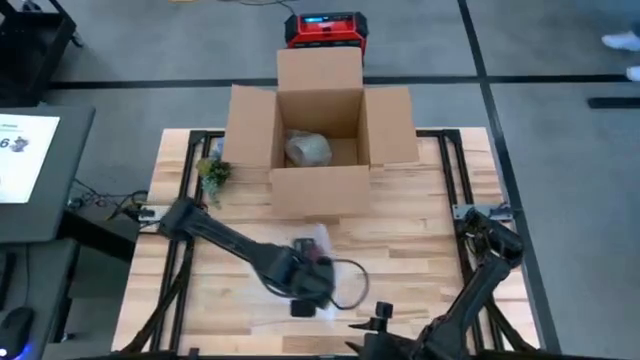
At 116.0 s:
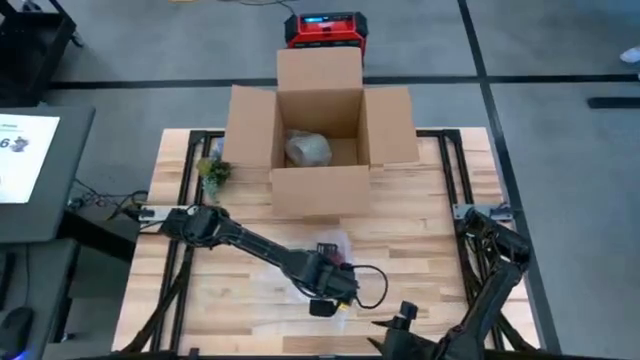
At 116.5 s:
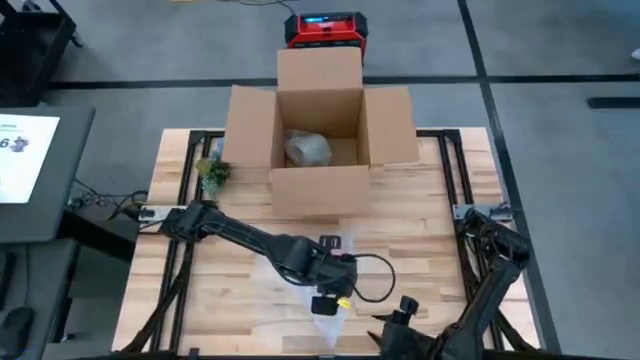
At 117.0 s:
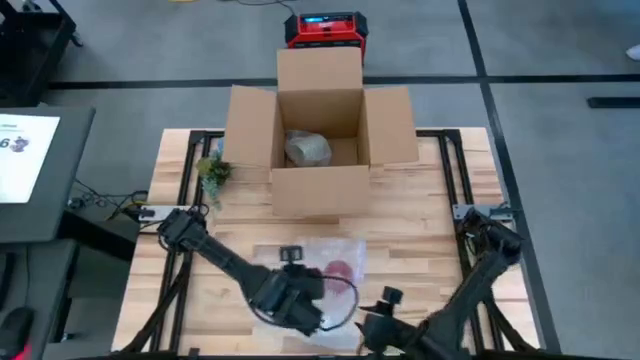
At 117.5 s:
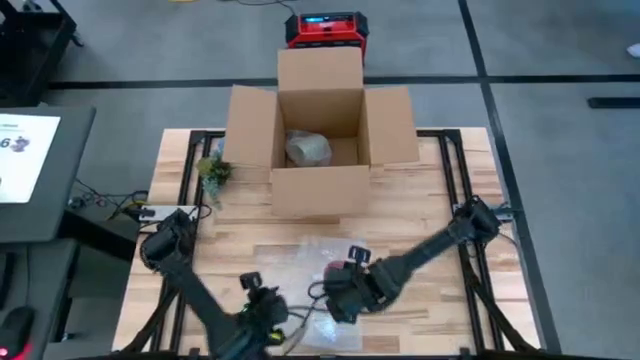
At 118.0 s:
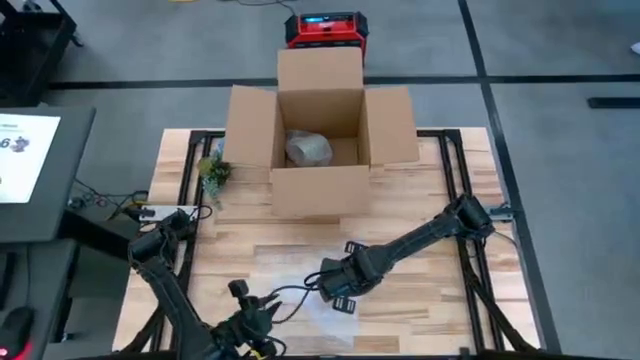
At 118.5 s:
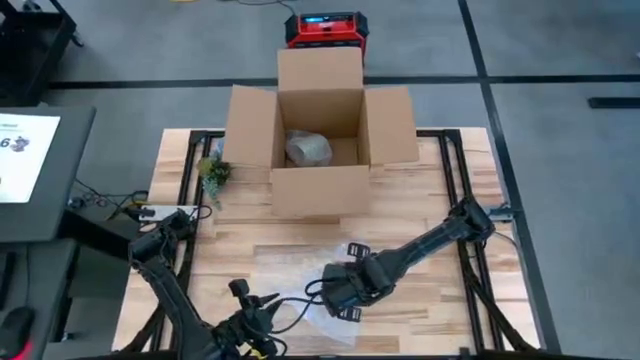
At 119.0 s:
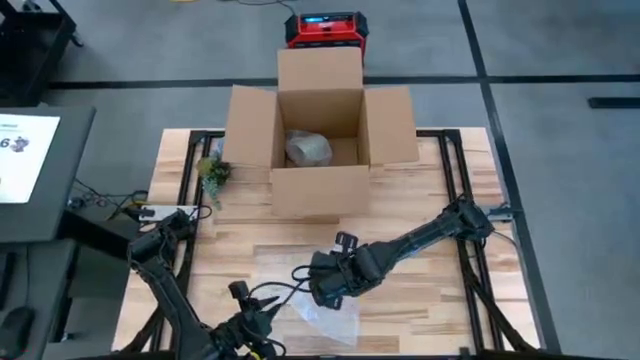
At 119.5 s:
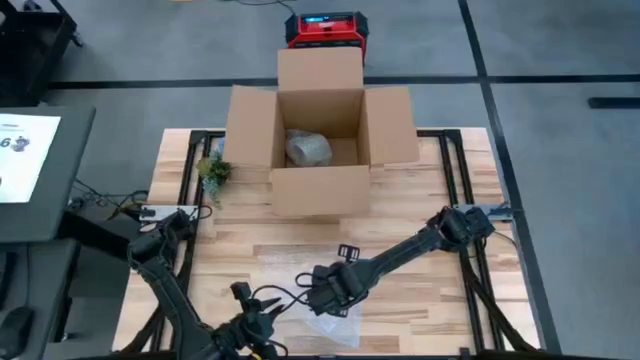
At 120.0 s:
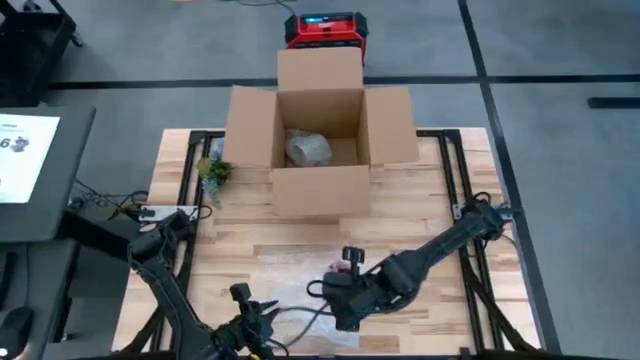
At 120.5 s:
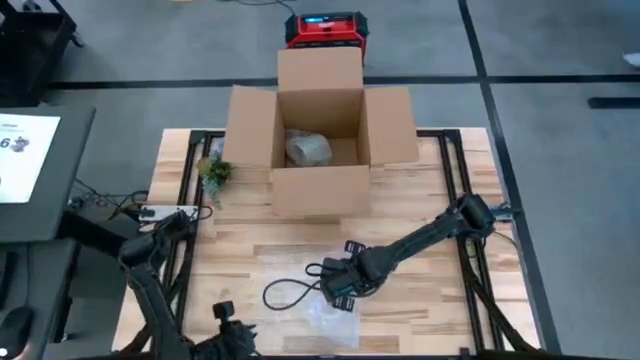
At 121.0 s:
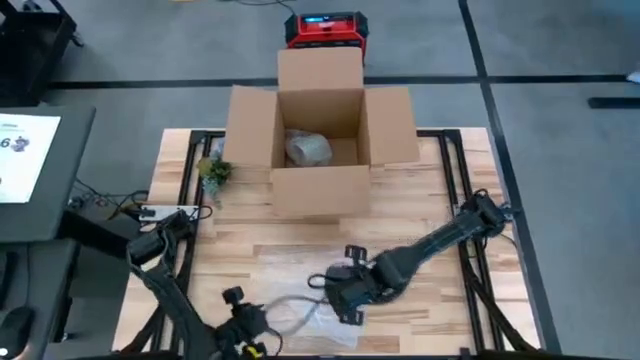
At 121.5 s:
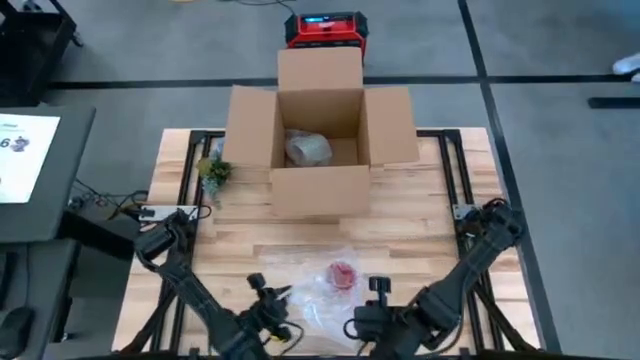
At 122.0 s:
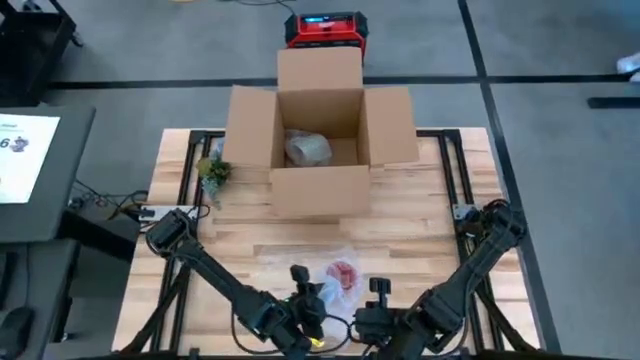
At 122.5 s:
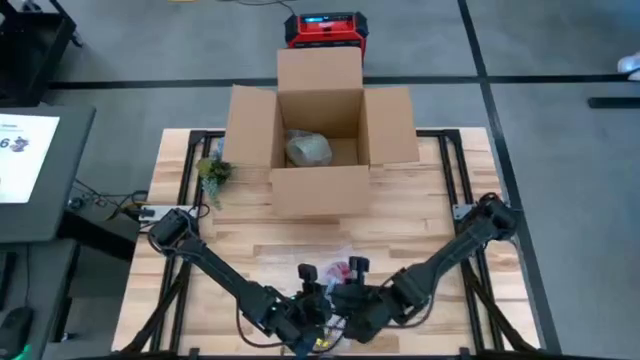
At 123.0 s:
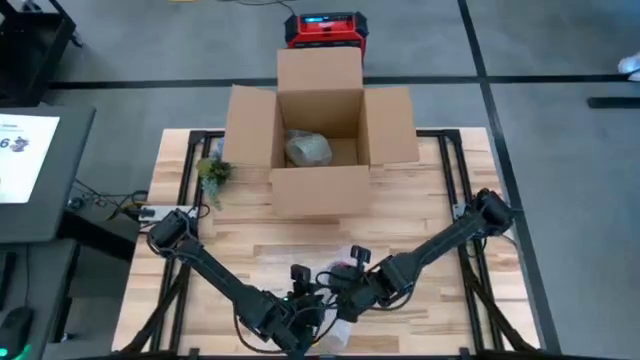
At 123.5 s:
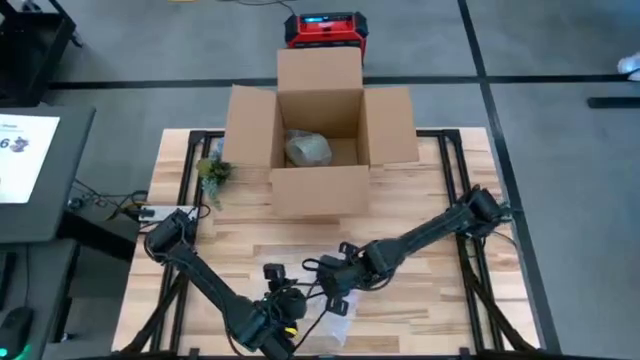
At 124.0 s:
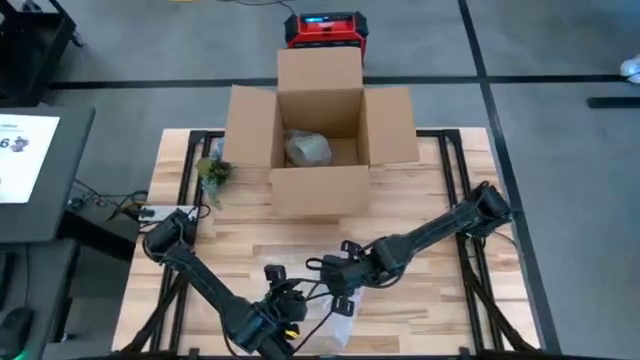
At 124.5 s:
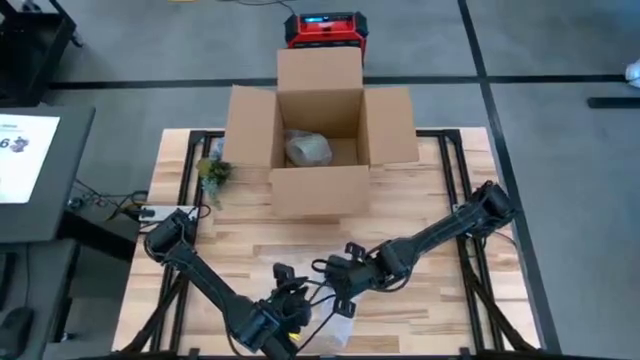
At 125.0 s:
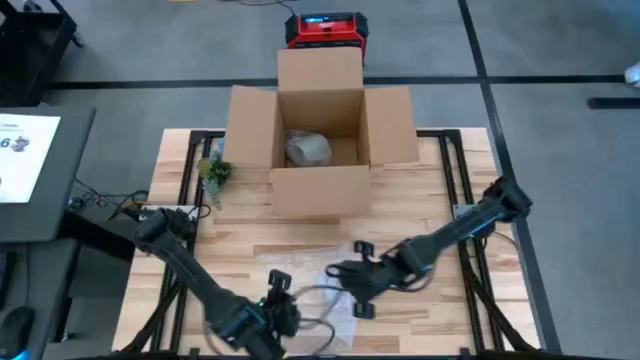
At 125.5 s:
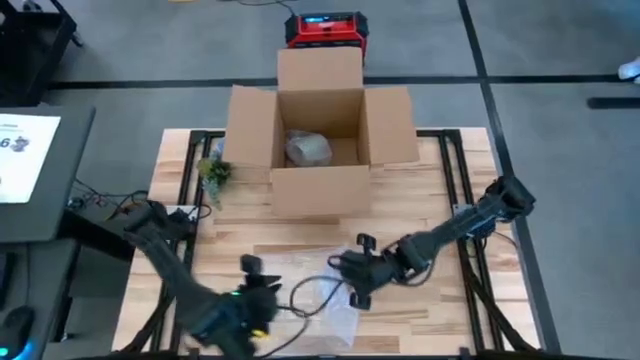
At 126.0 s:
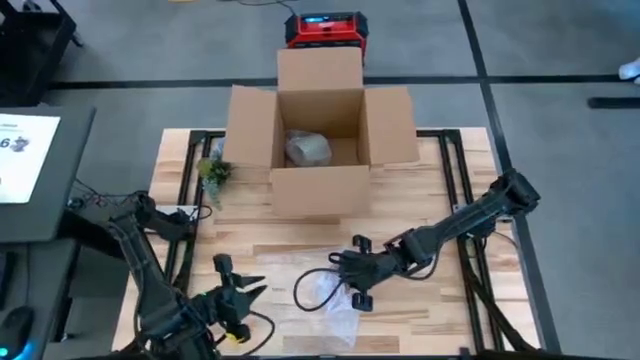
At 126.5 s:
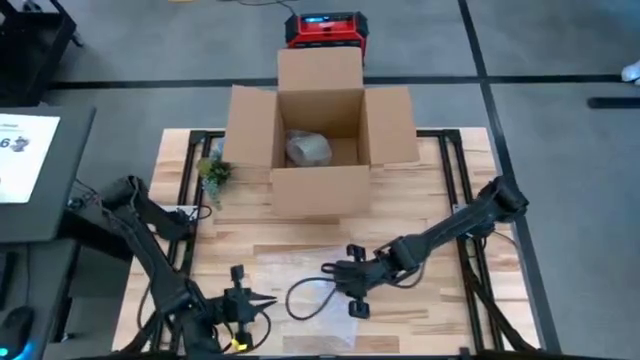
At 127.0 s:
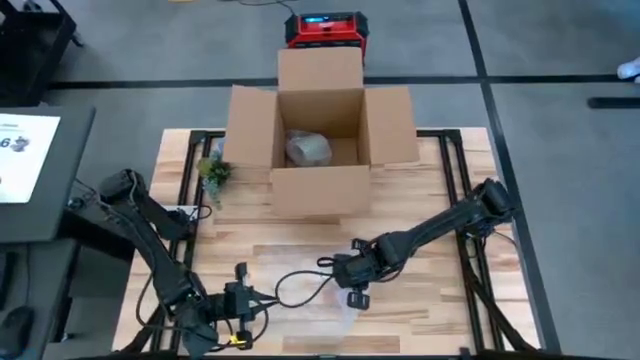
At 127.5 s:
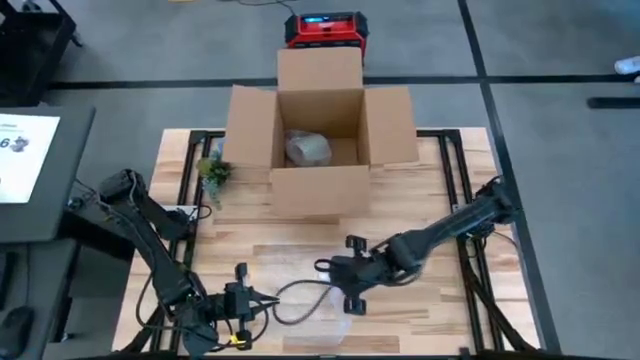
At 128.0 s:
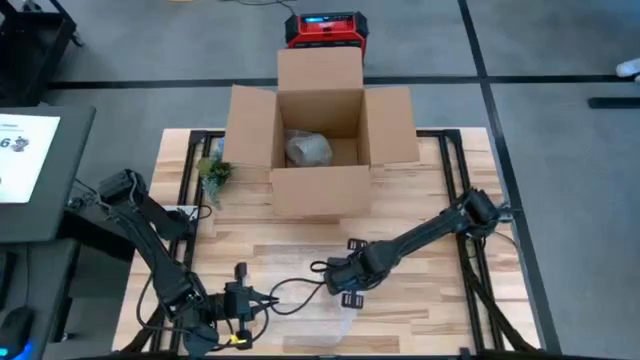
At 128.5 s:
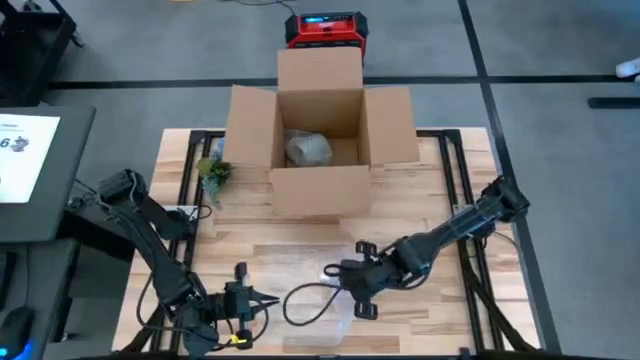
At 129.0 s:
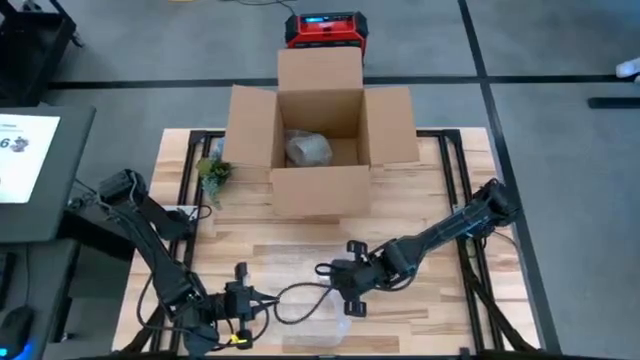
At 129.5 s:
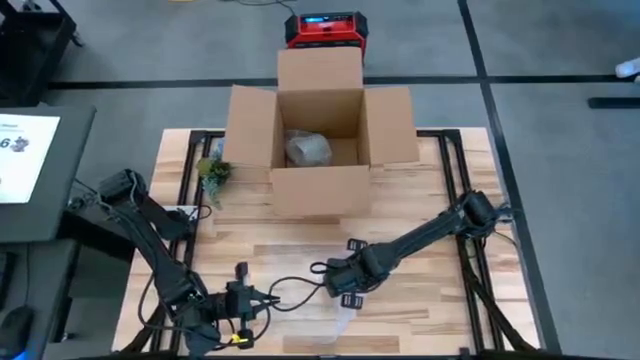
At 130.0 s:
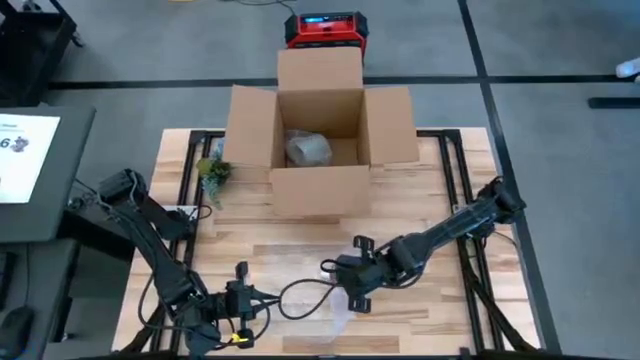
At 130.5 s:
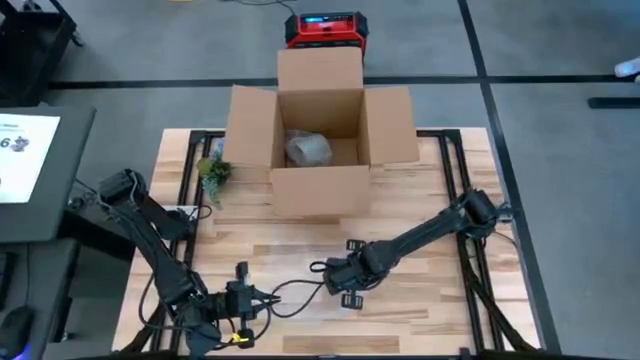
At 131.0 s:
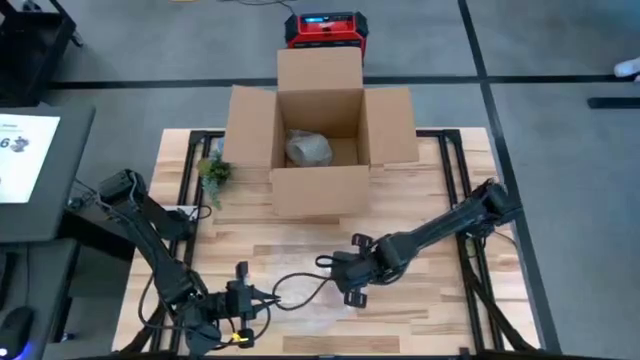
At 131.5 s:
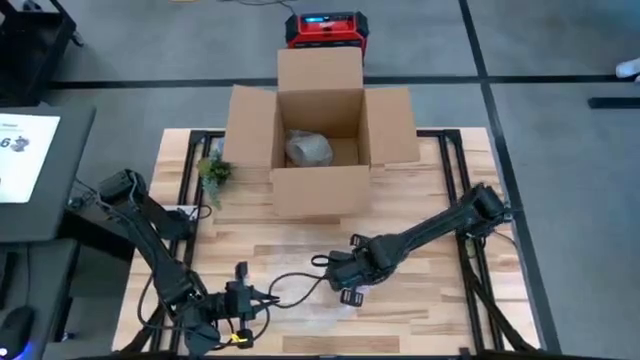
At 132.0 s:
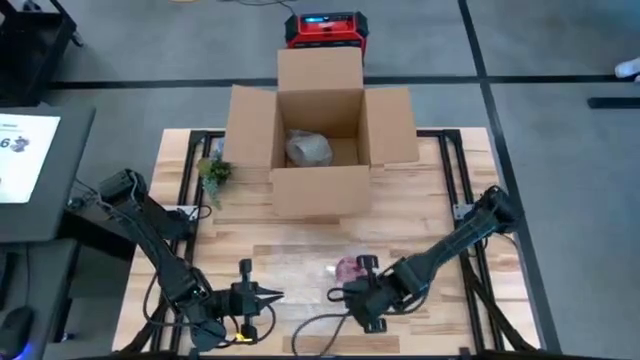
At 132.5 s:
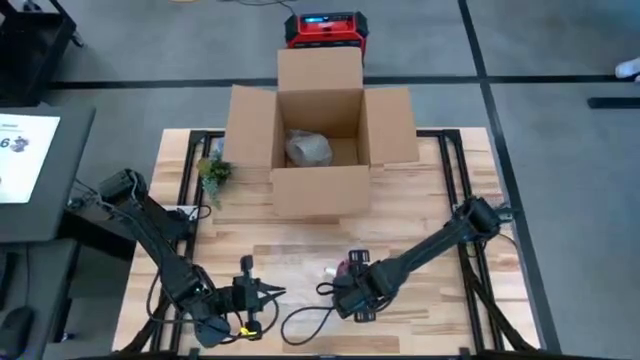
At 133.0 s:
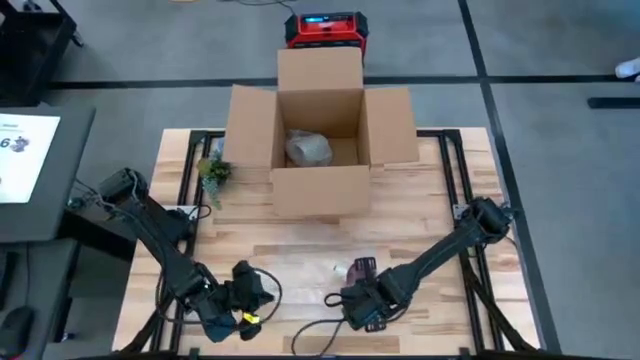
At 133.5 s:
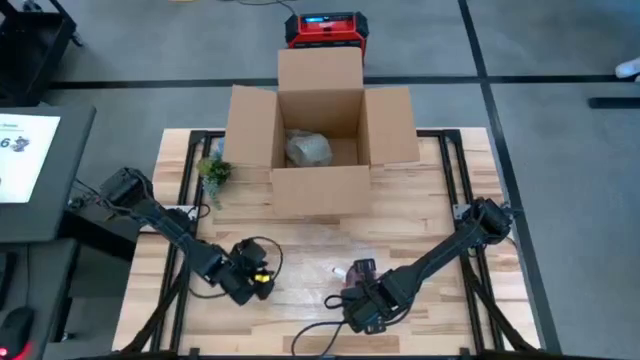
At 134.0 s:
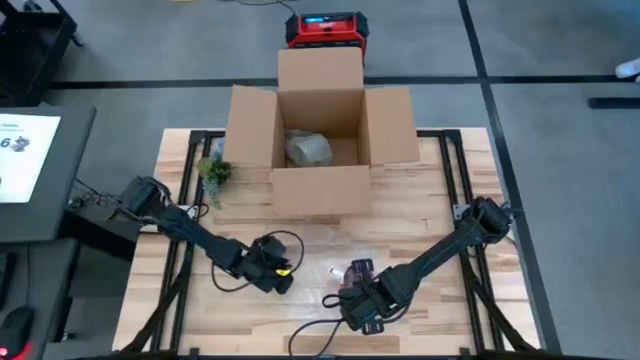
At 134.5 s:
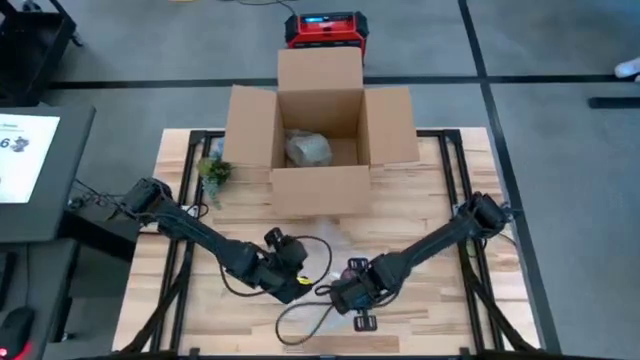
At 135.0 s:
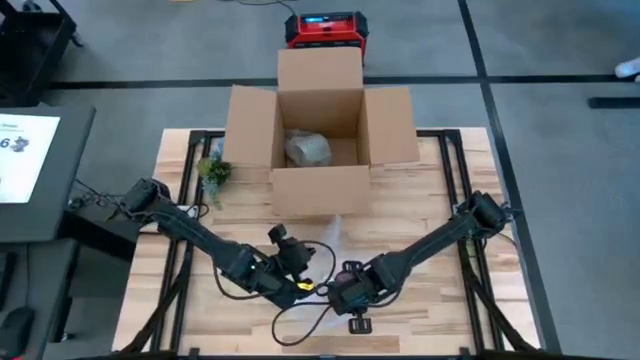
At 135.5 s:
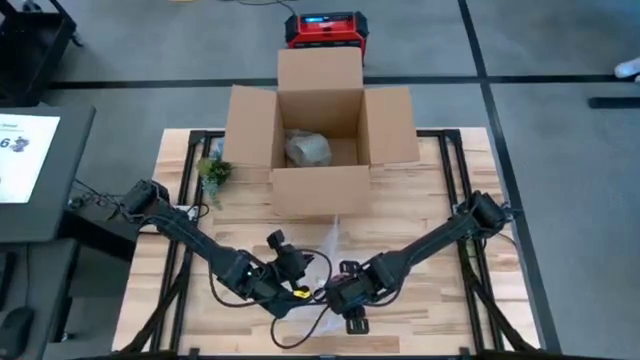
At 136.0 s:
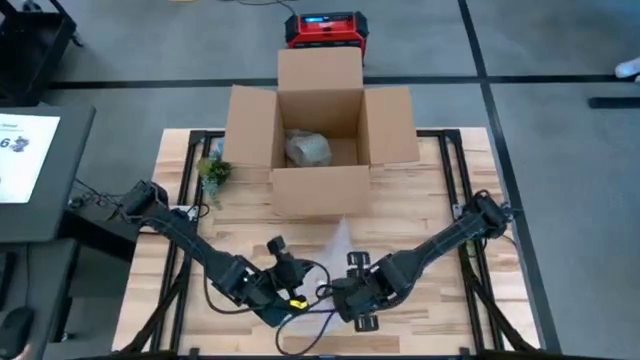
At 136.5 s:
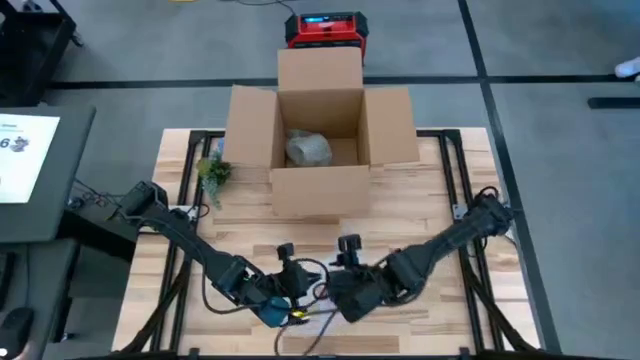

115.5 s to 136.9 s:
Task: wrap mug
Pack the red mug with the bubble wrap
